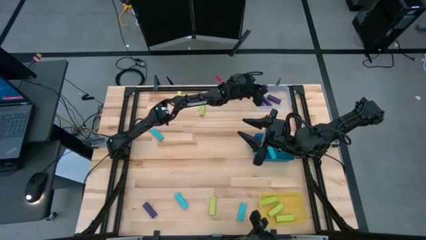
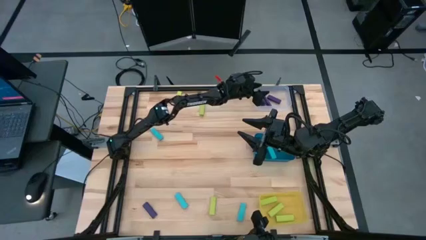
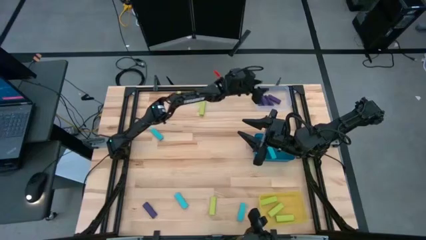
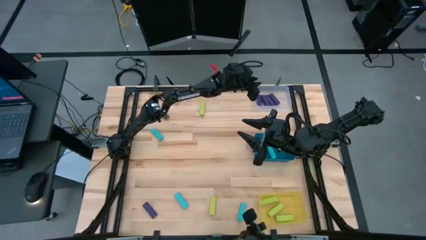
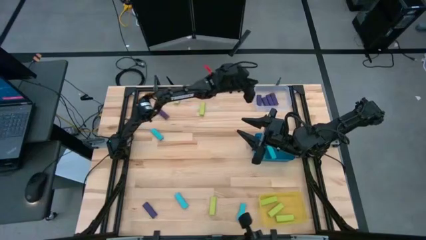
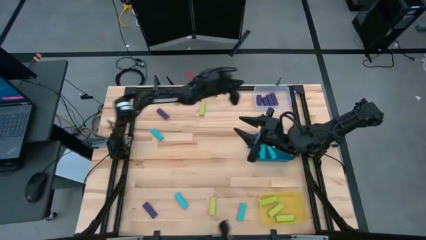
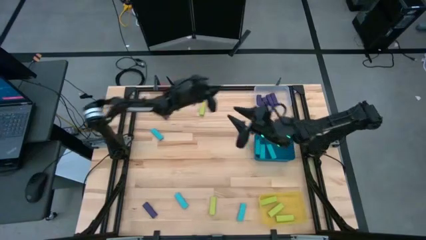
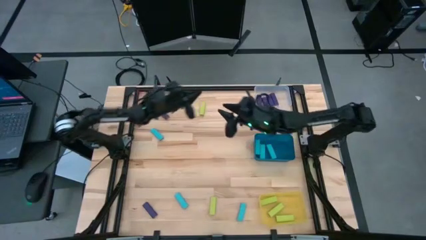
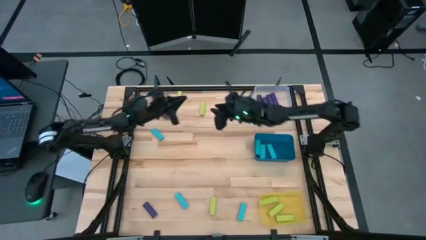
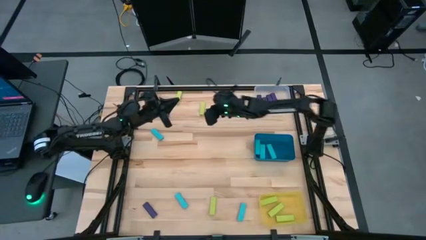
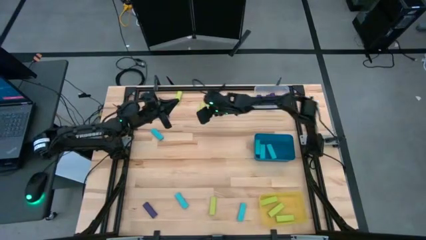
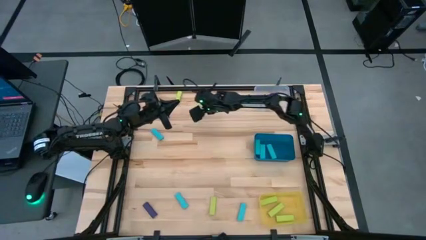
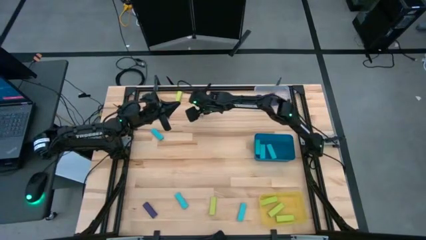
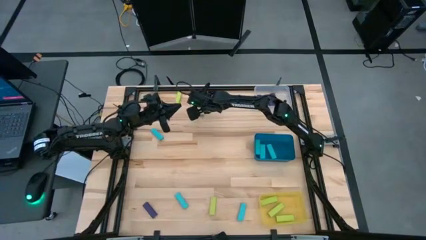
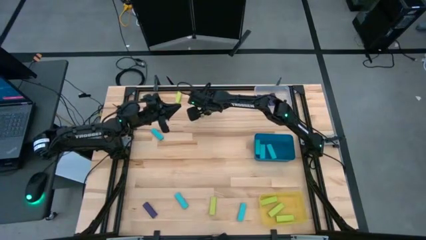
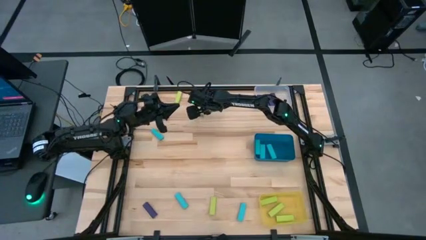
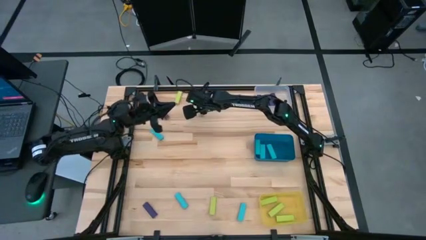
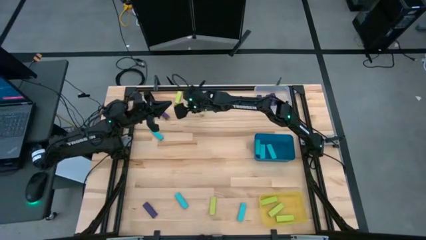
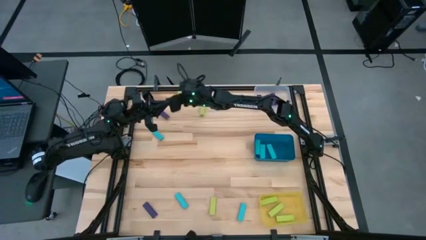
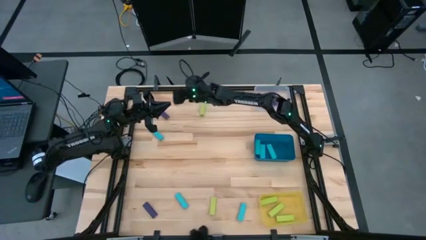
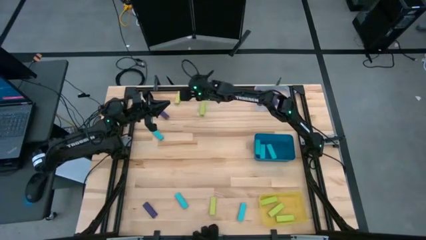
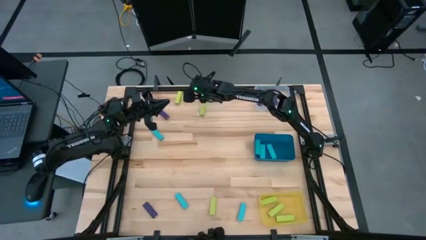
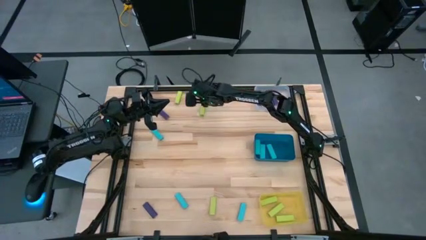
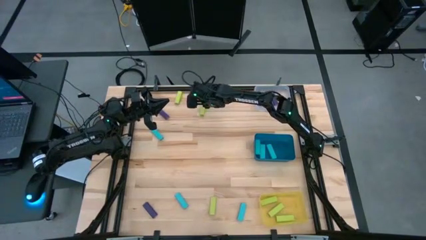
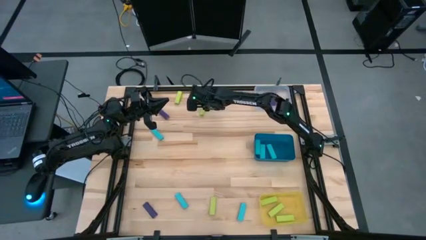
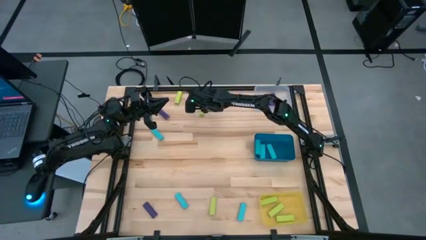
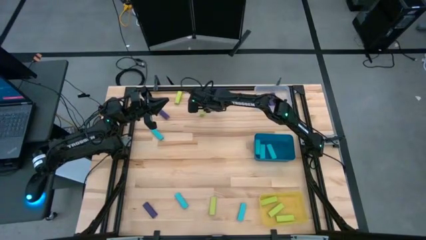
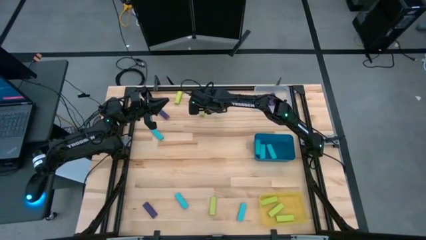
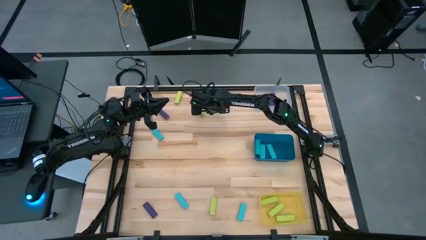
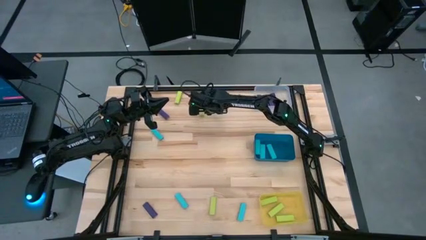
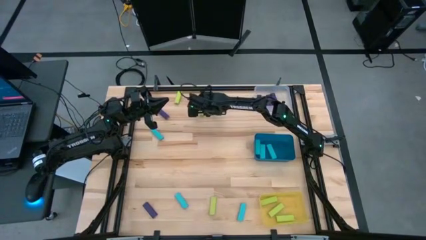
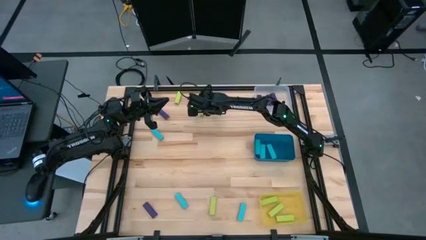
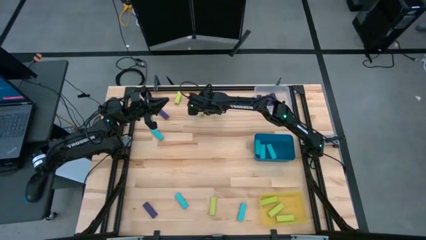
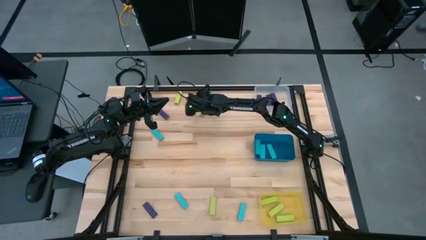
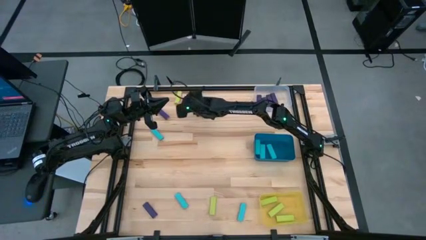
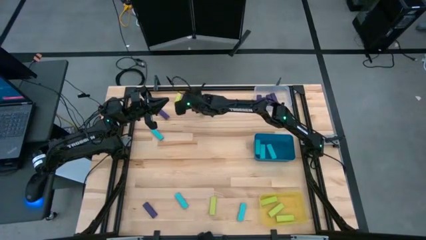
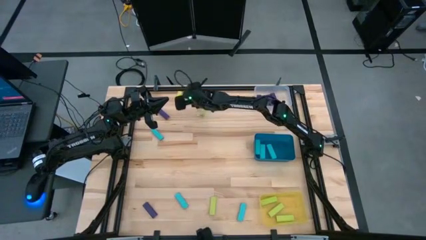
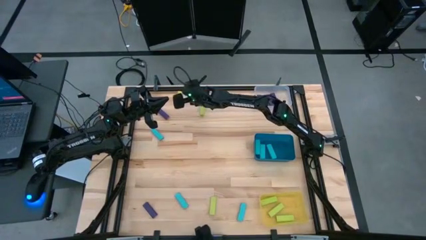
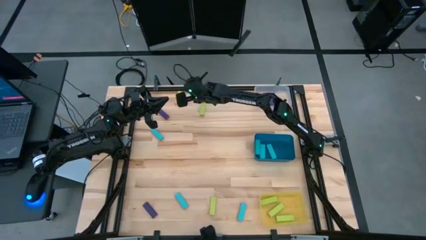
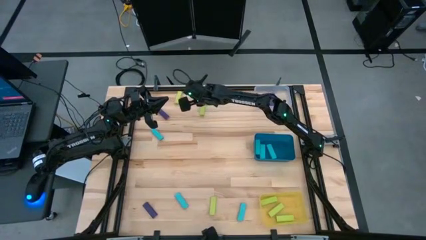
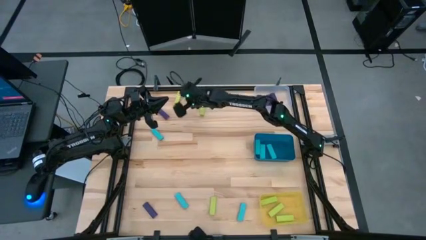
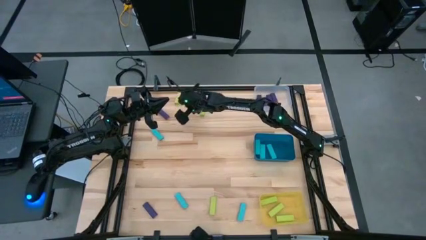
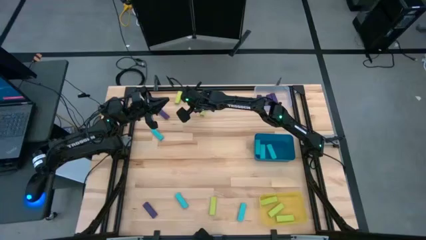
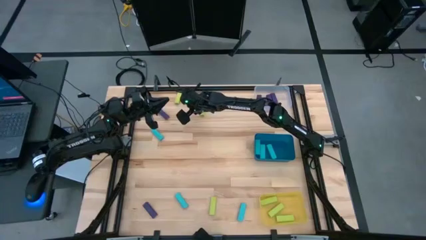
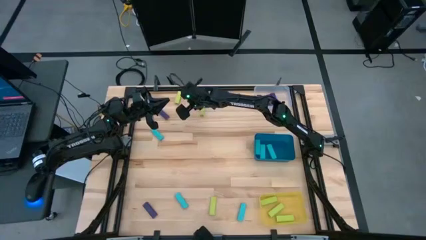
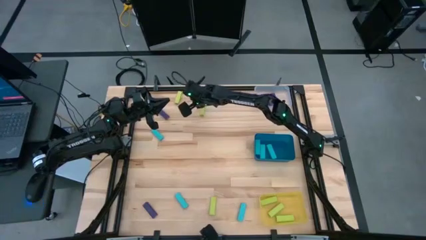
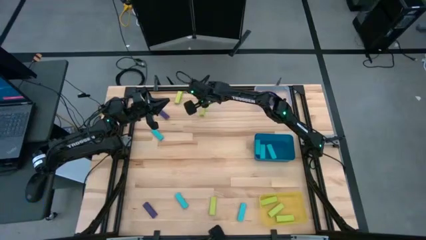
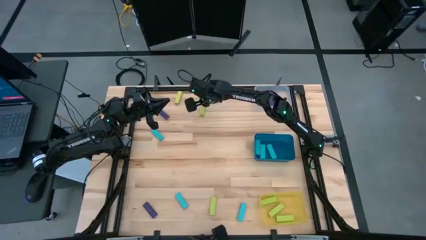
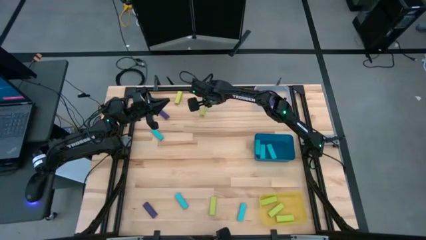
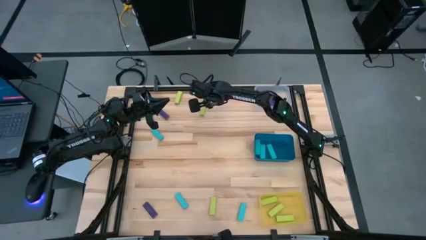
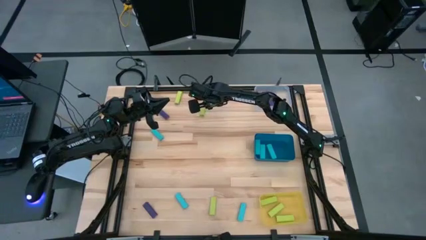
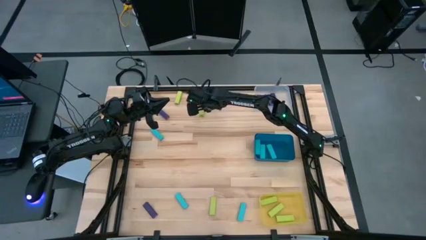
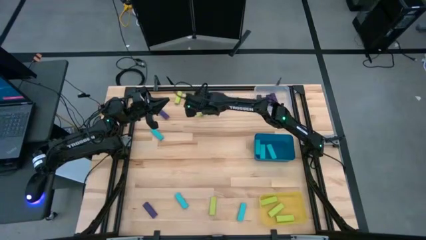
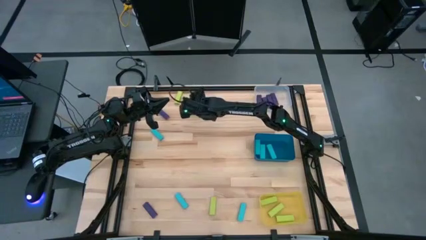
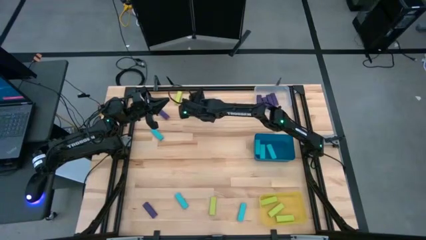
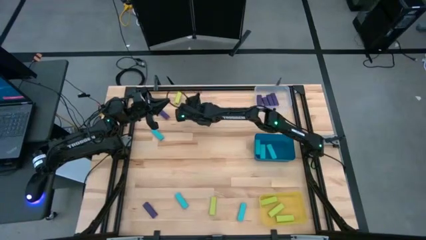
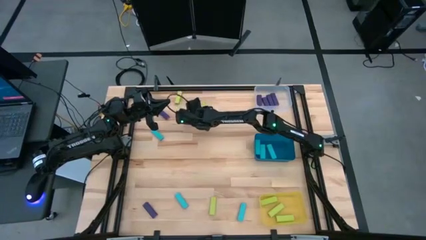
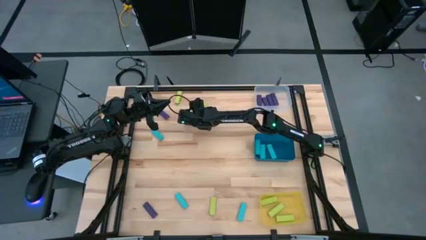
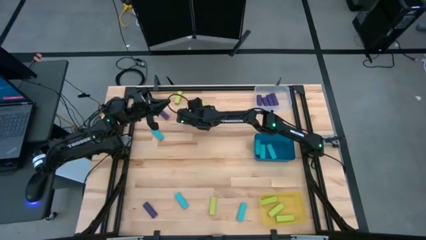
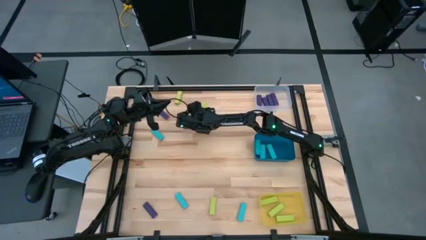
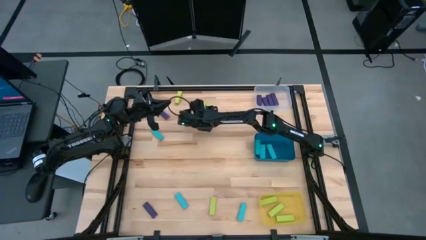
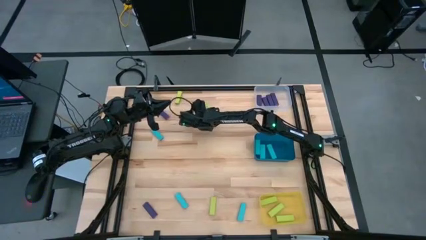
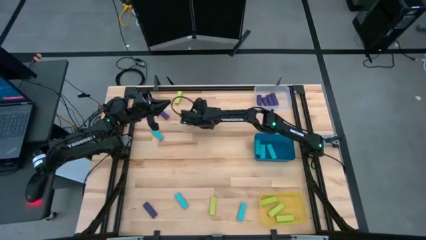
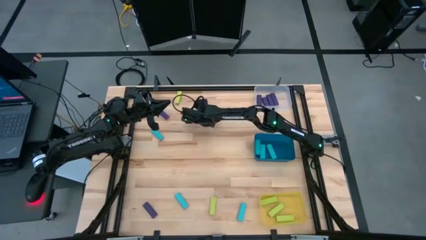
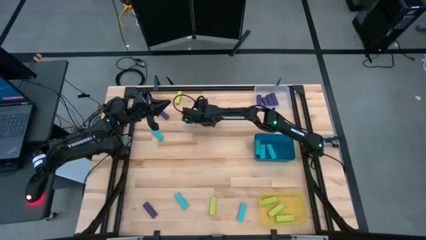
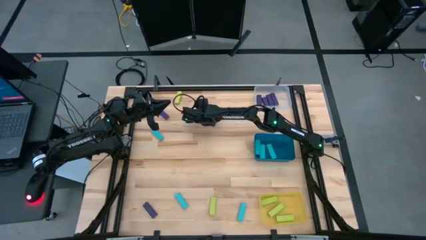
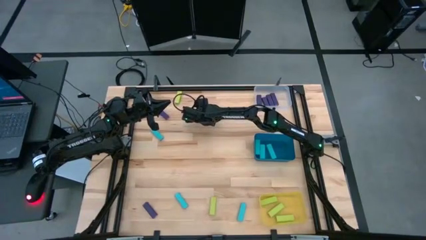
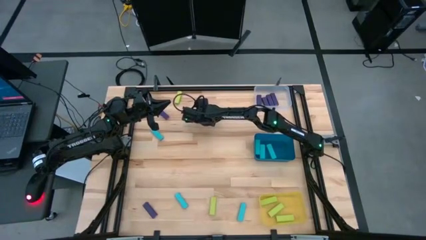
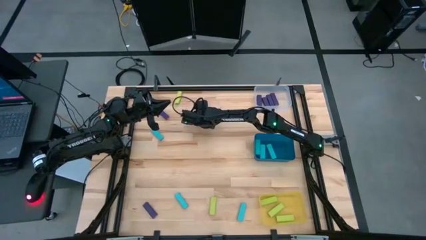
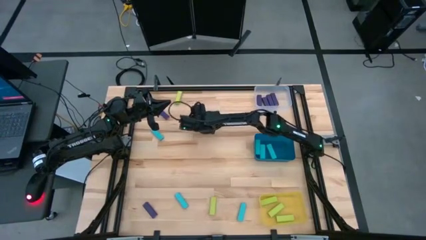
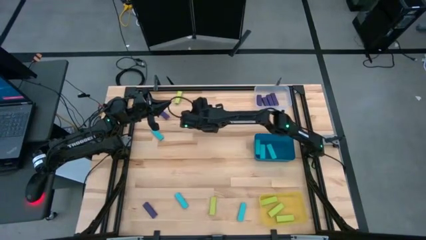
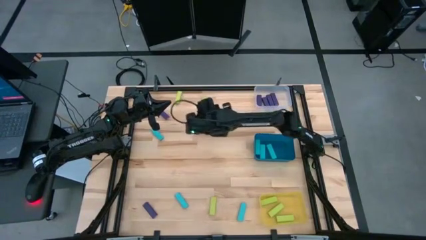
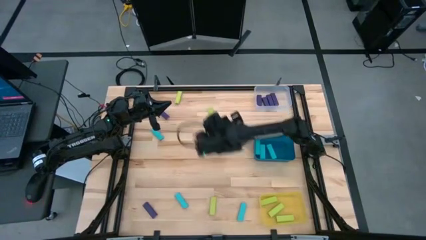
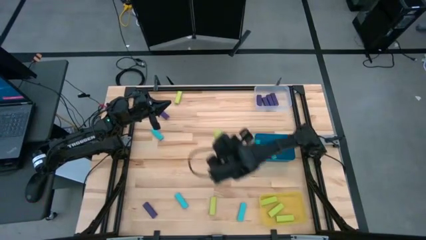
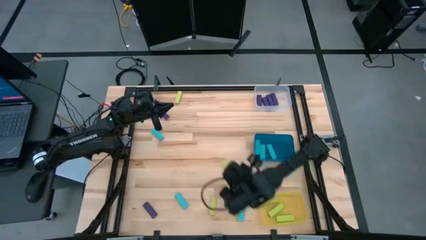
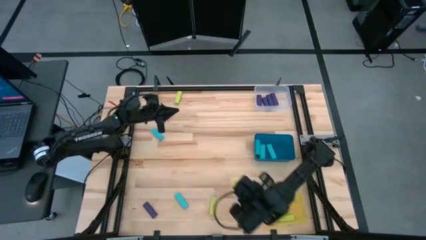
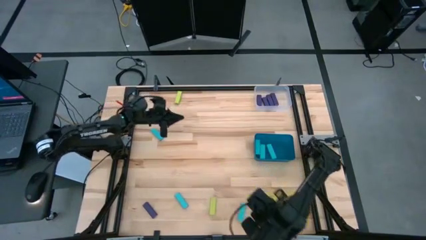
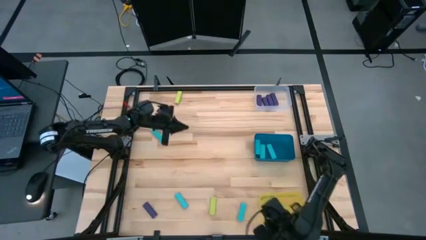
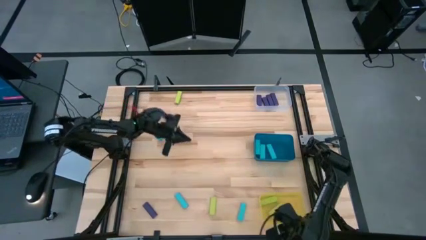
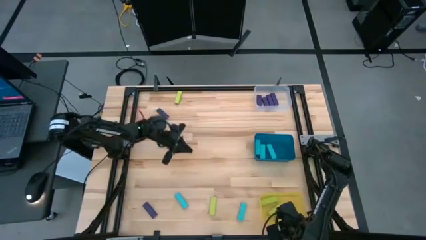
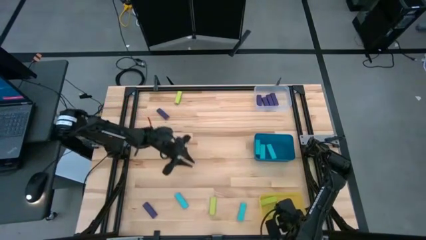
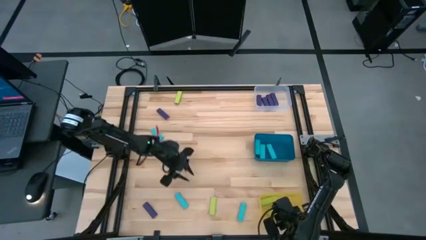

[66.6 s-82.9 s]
Task: Sort blocks
Put the light green block into the yellow bin
